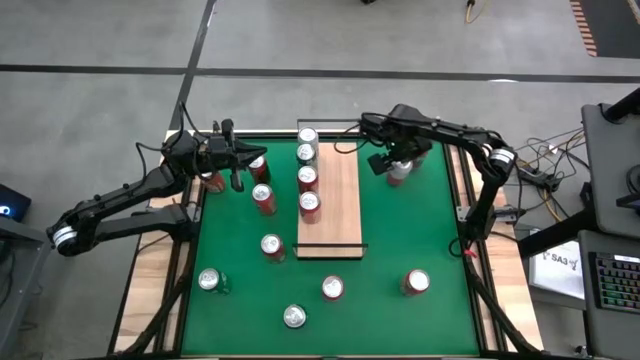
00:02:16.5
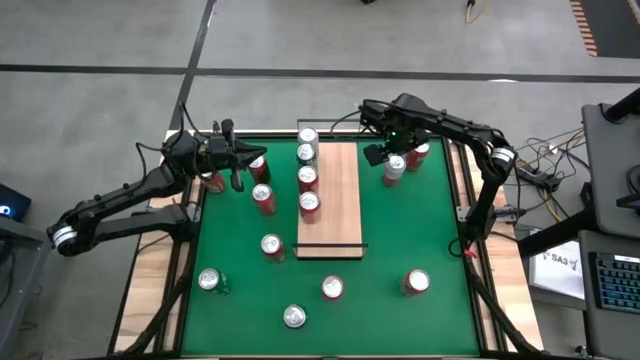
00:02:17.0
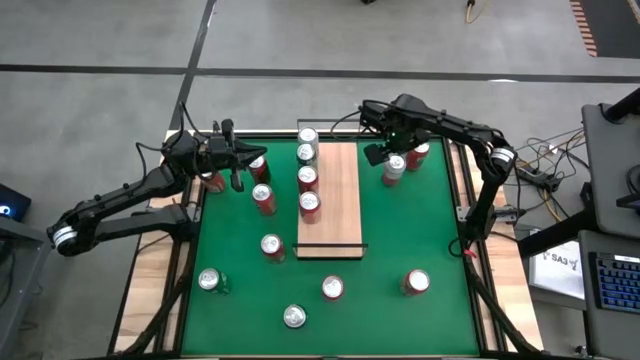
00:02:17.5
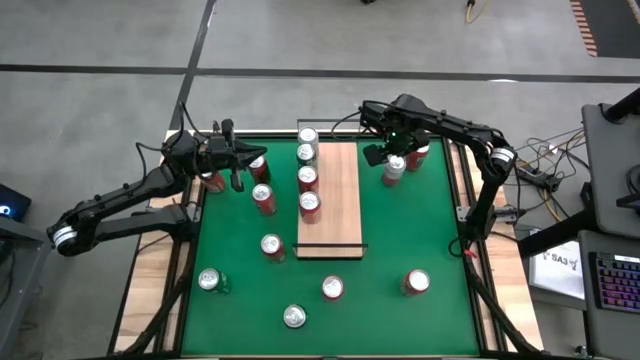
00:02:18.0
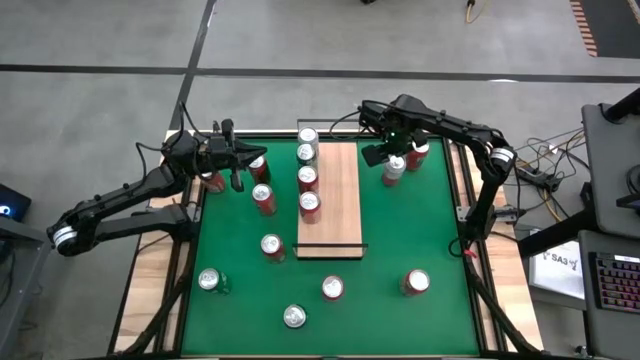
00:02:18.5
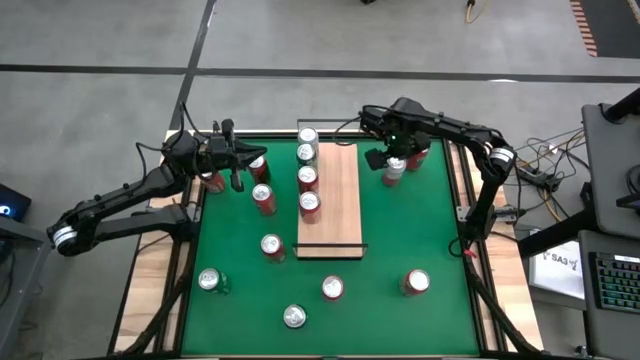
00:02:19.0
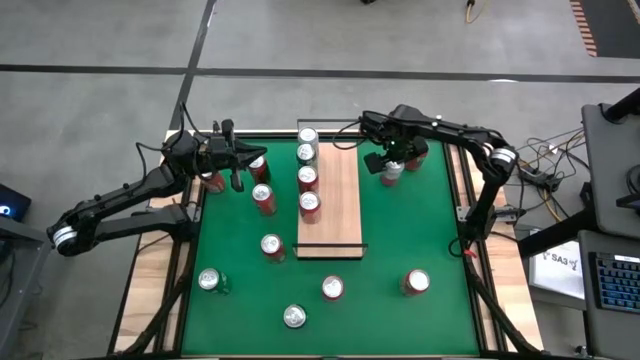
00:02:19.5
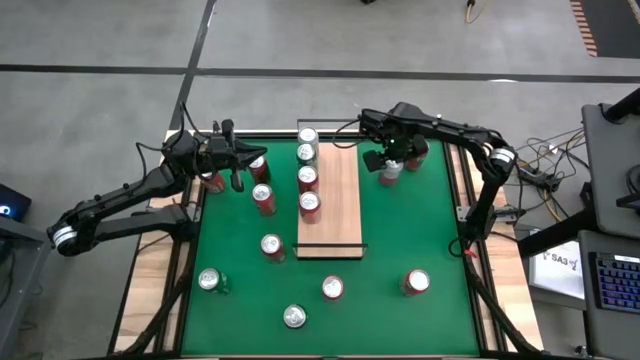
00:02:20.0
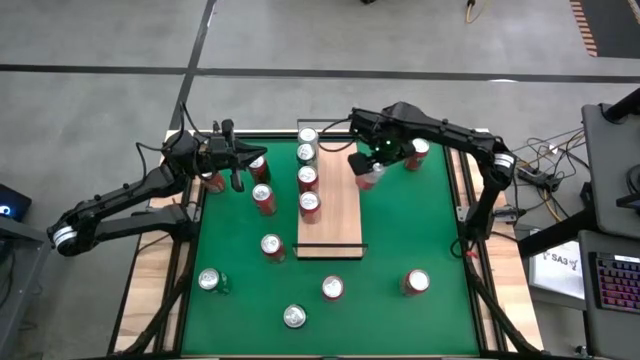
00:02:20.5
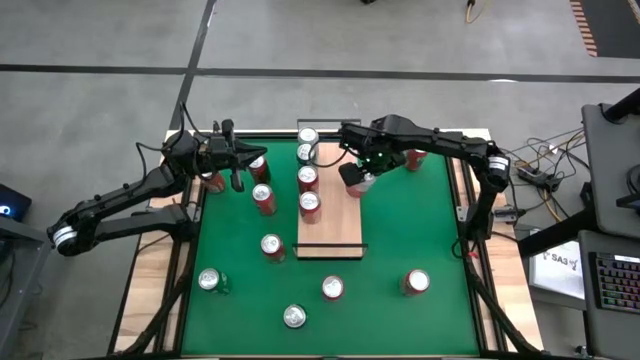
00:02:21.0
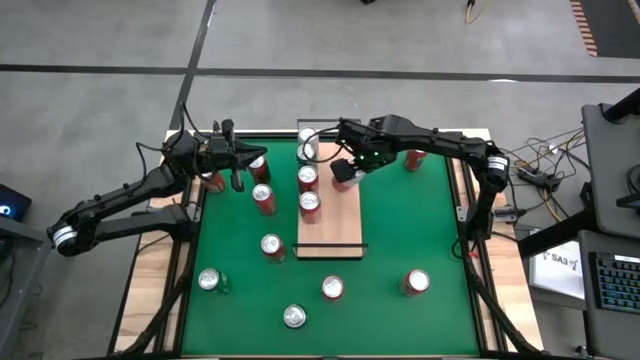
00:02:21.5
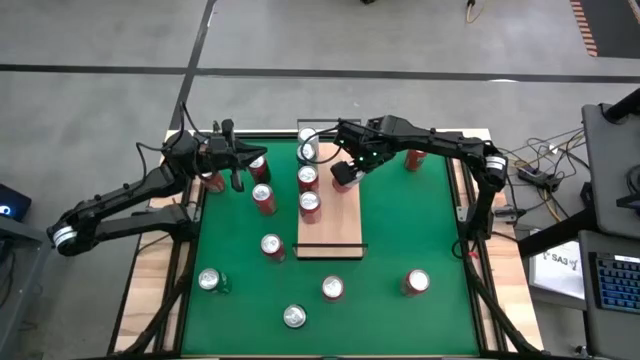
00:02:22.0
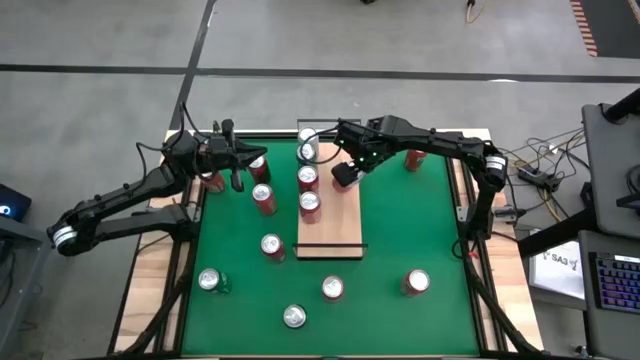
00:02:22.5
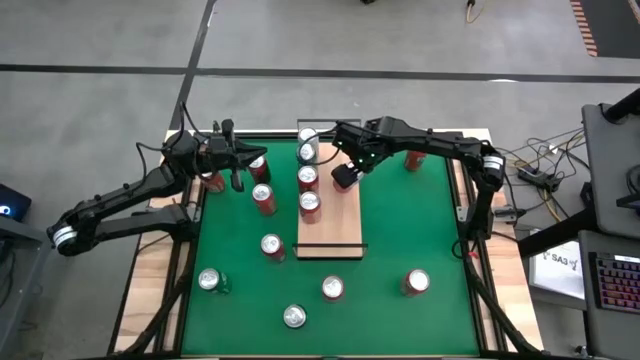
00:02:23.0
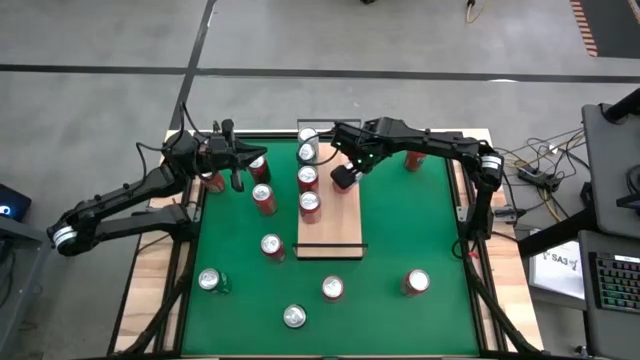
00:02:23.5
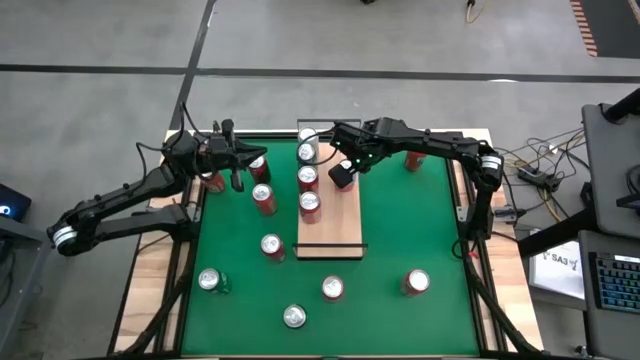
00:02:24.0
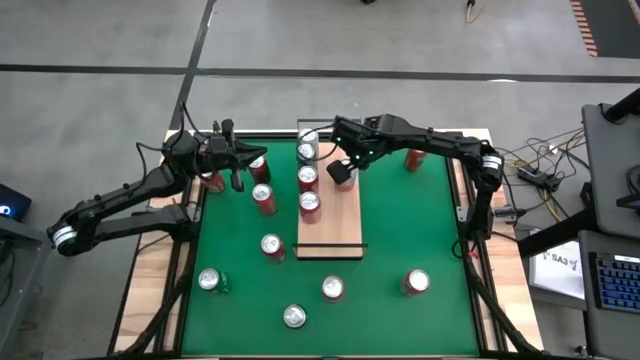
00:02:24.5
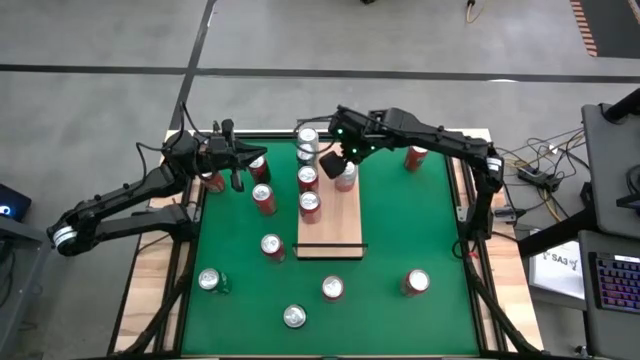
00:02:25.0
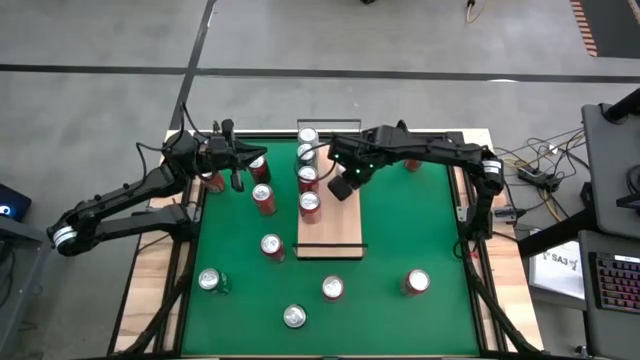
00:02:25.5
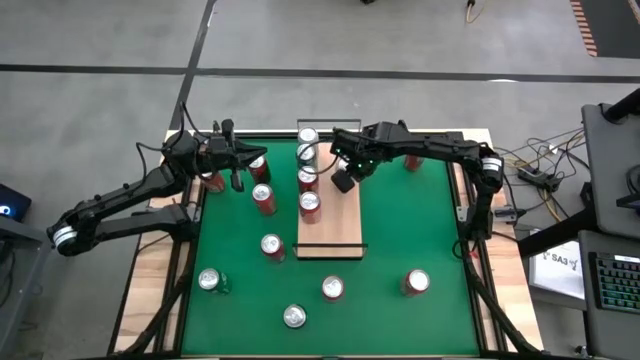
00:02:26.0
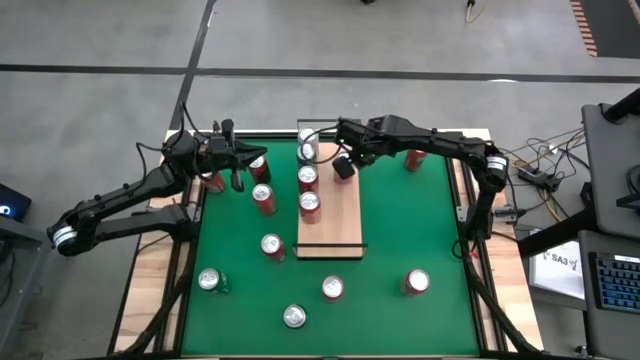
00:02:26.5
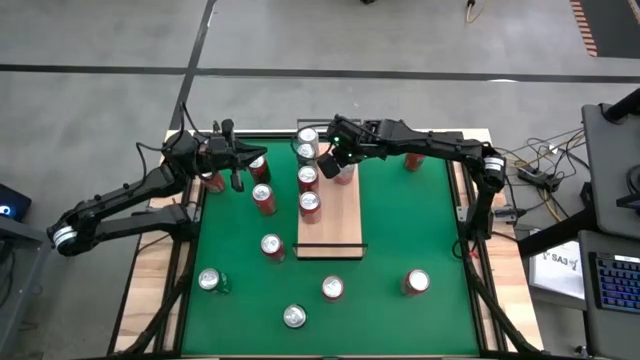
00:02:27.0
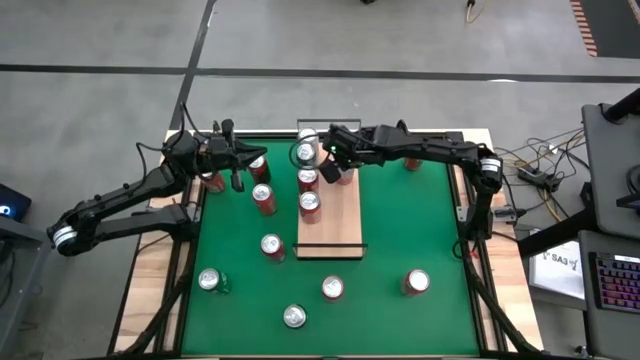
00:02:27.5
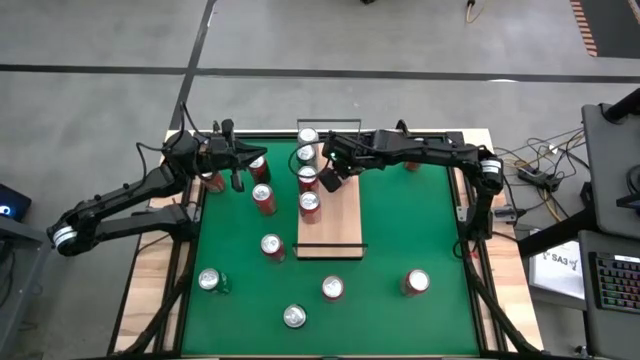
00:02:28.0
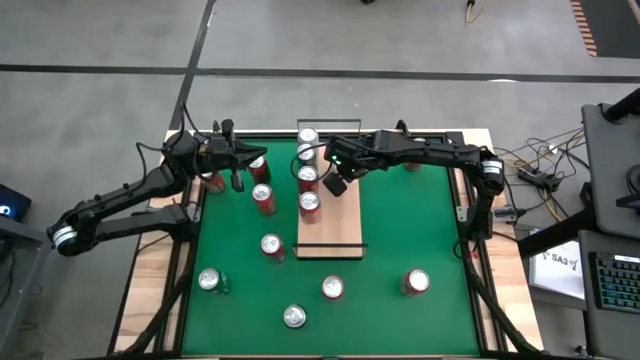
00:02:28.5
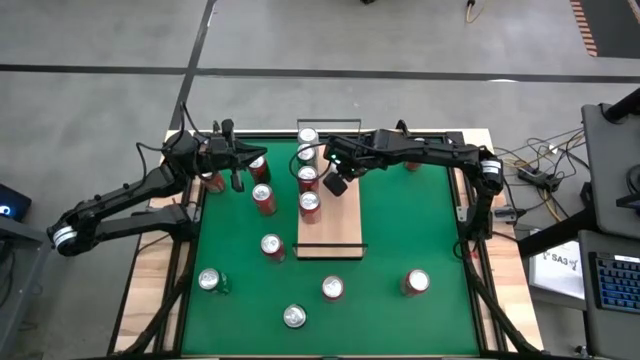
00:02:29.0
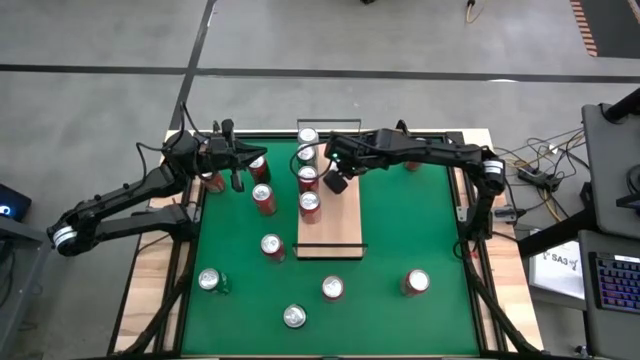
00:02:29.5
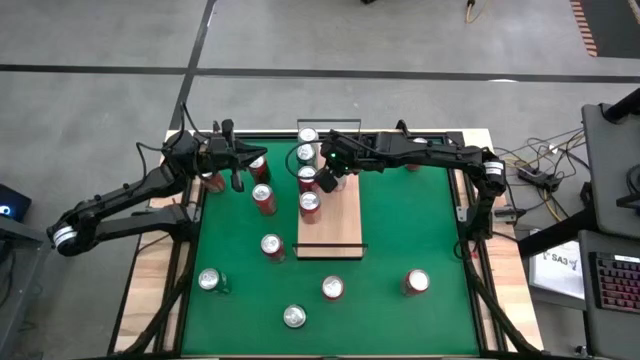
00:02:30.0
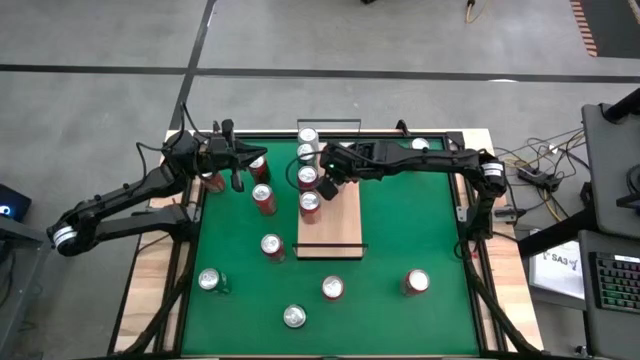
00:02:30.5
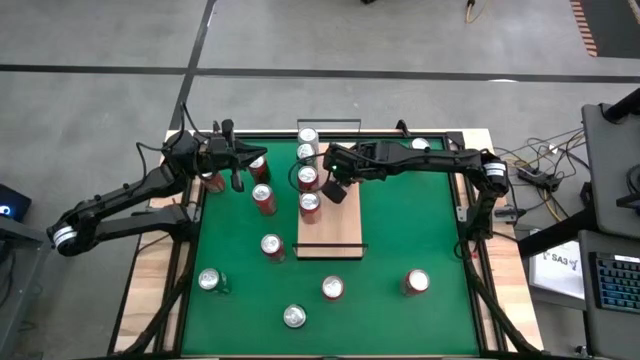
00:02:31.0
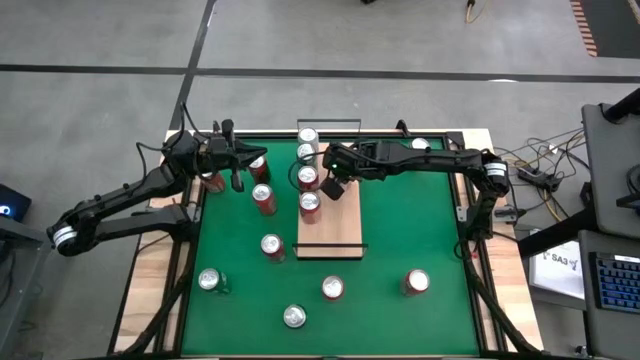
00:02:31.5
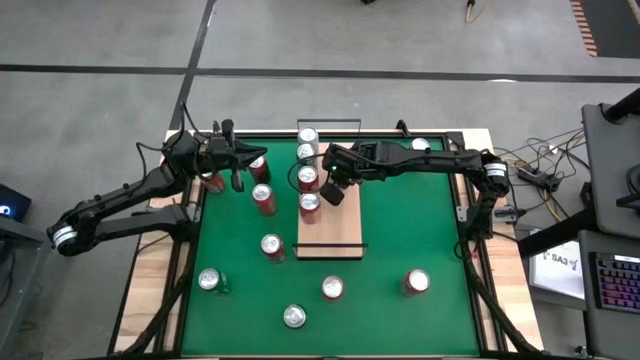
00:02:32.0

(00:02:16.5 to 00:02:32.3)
Task: Place canned beverage on shelf
Put the white/pink soda can on the shelf and aligned with the other white/pink soda can

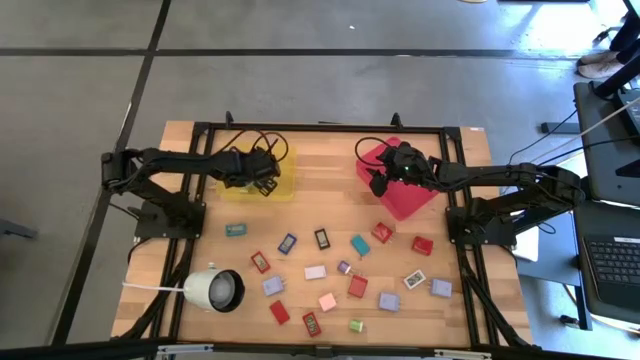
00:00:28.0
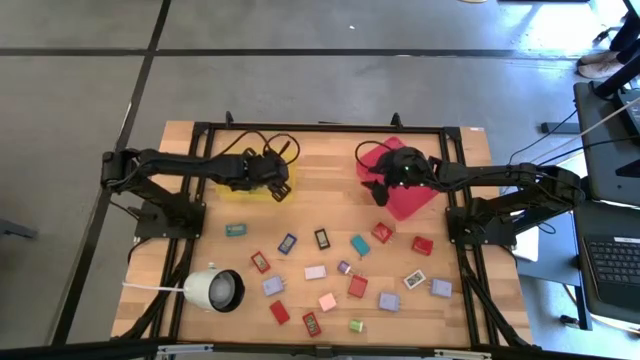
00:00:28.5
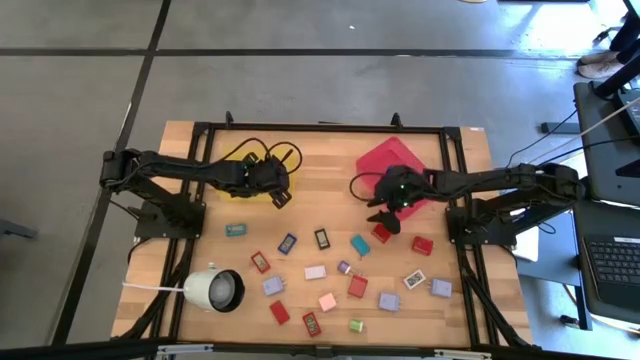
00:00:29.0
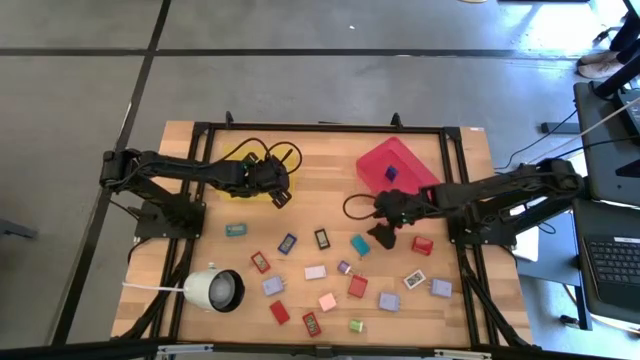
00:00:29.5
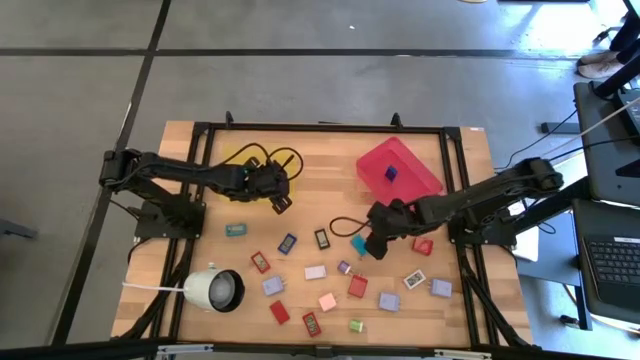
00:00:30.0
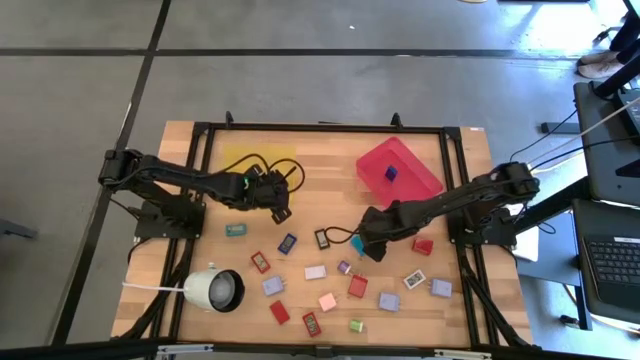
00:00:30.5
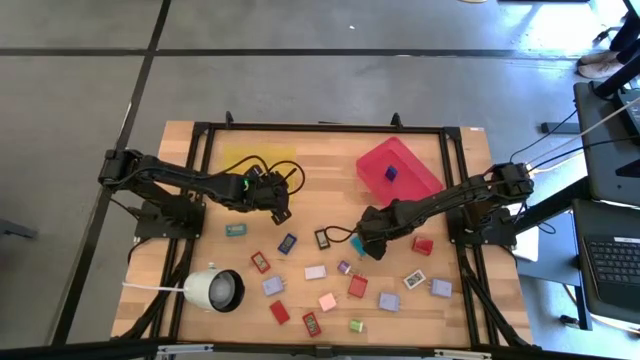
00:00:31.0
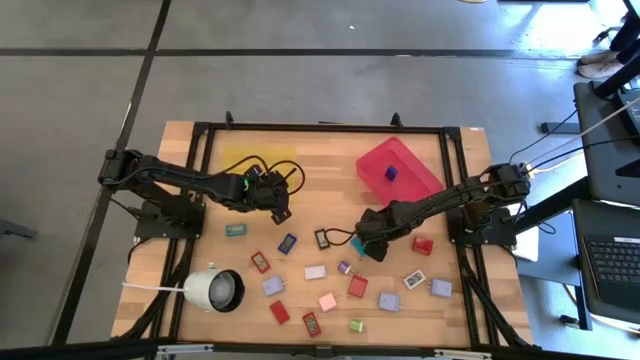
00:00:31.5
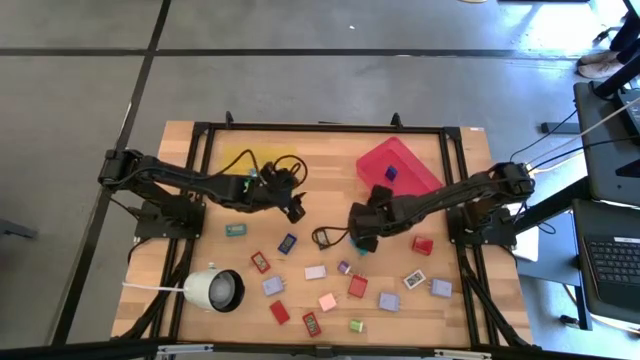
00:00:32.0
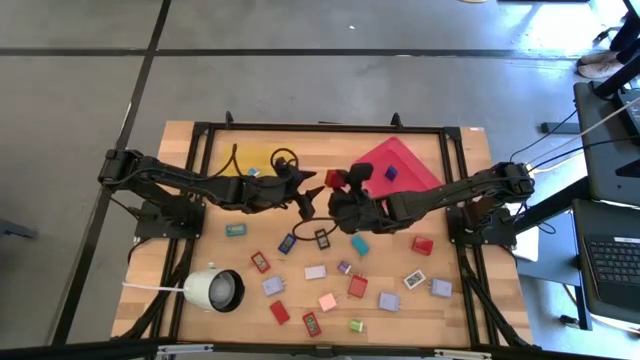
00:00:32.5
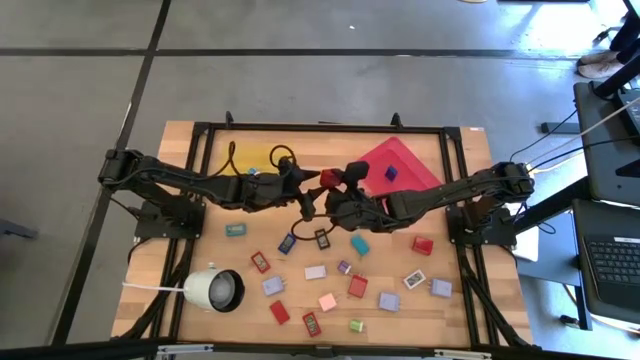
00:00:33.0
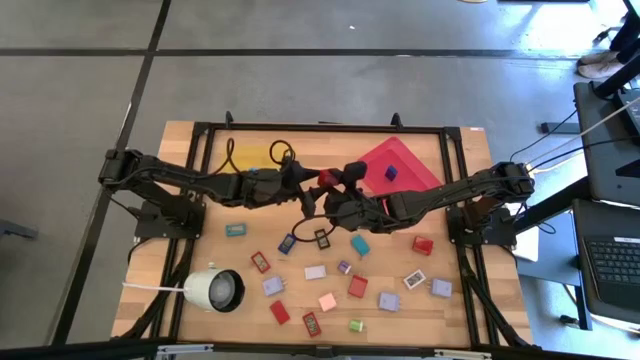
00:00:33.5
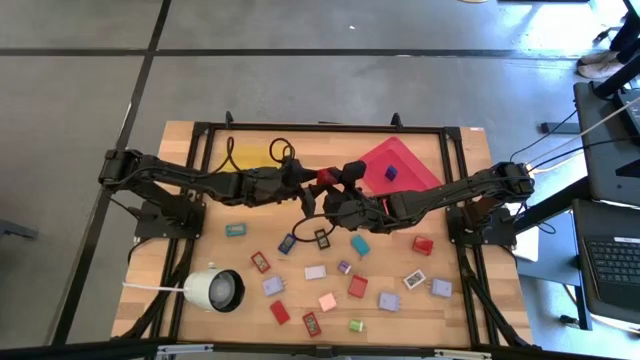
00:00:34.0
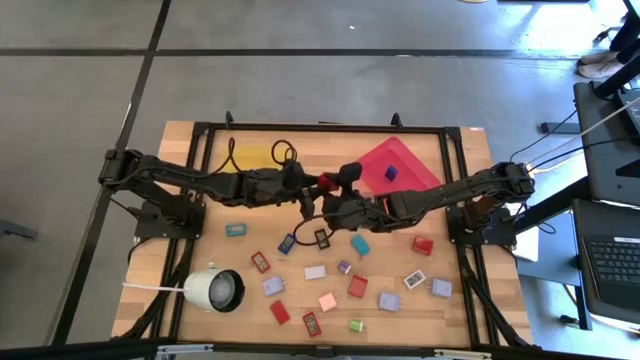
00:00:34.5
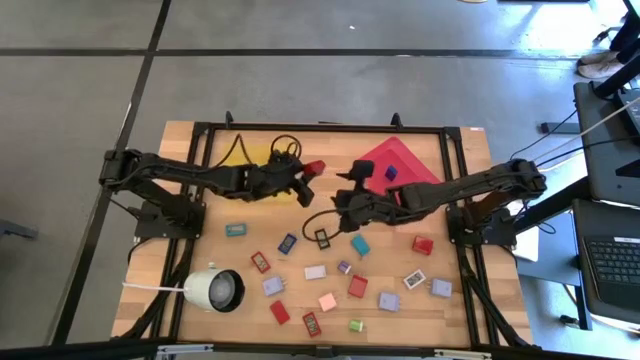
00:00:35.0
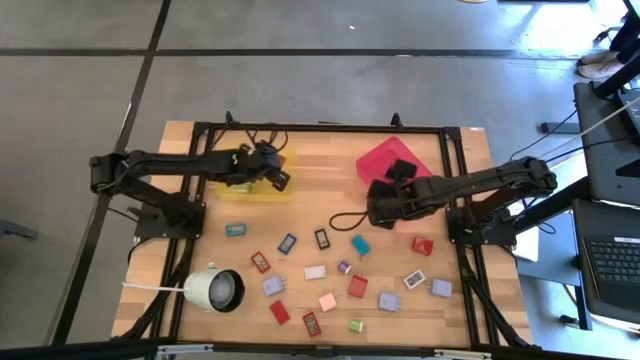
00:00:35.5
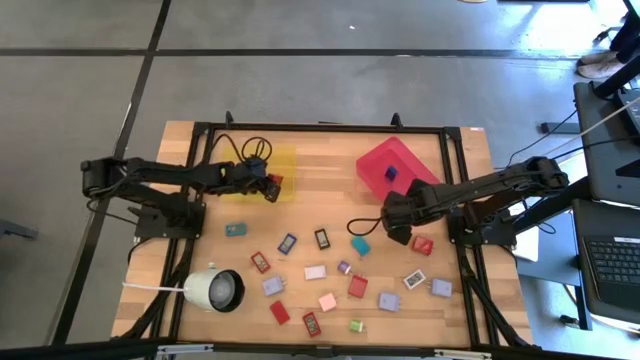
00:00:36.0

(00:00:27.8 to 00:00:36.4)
Task: Pick & Place Office items
Put the top left red charger adapter into the yellow bin
